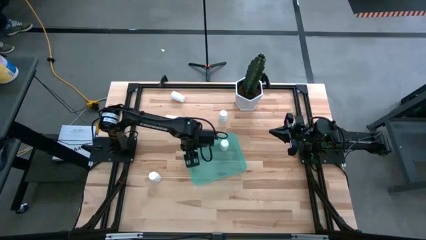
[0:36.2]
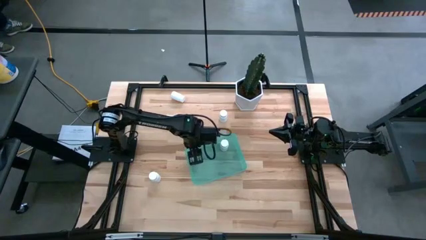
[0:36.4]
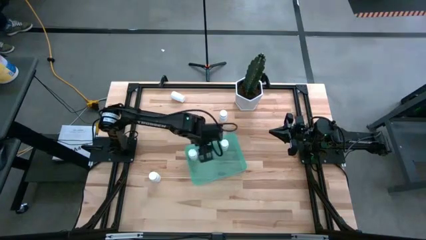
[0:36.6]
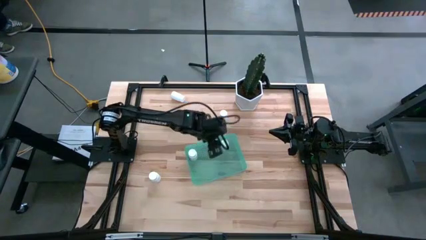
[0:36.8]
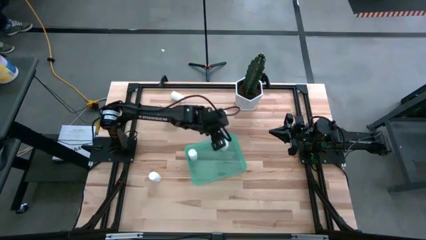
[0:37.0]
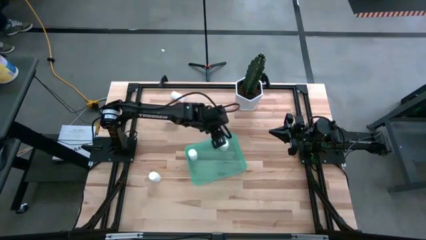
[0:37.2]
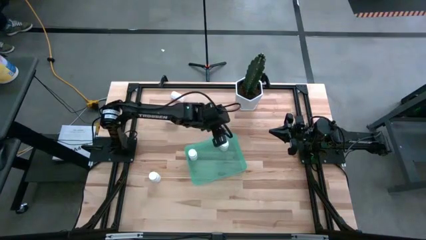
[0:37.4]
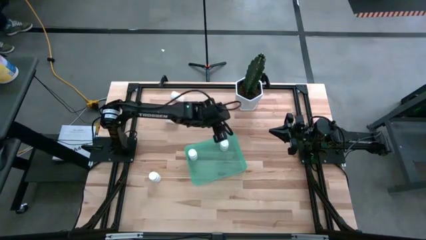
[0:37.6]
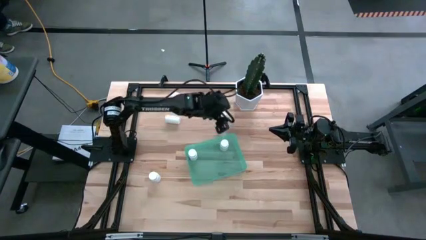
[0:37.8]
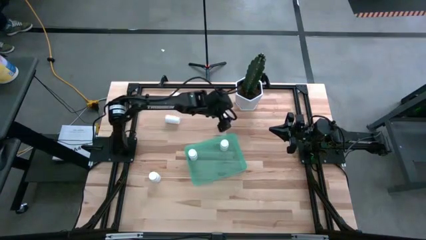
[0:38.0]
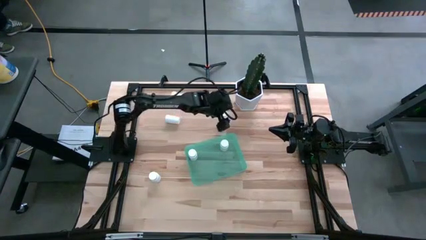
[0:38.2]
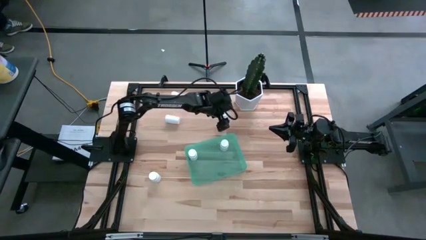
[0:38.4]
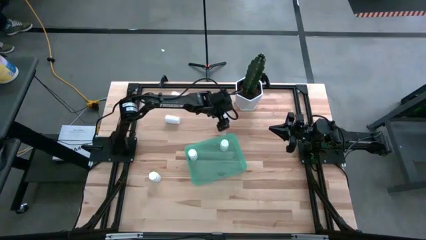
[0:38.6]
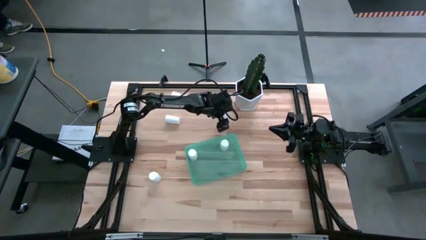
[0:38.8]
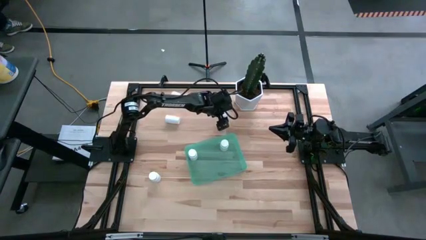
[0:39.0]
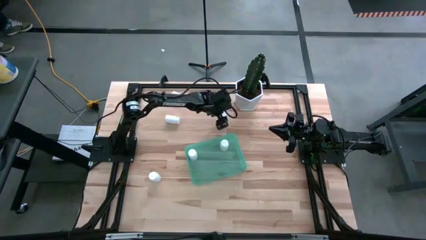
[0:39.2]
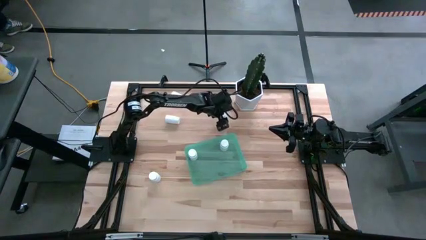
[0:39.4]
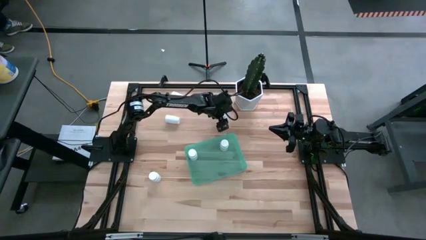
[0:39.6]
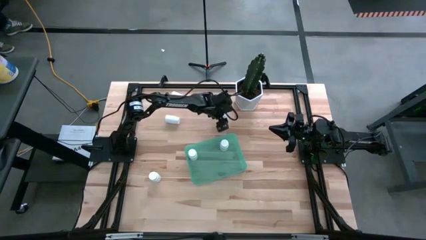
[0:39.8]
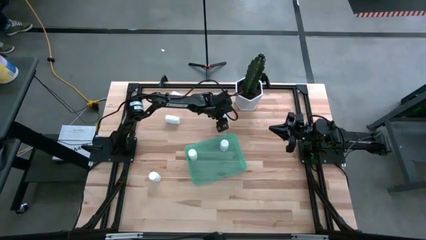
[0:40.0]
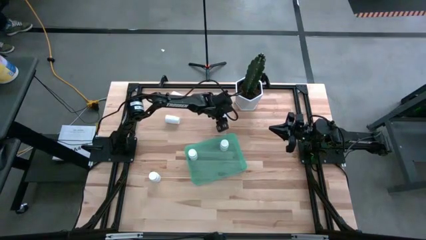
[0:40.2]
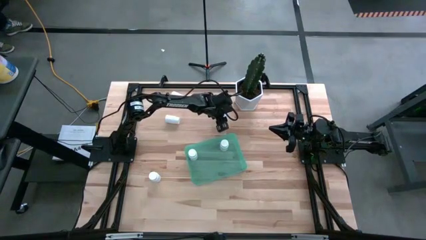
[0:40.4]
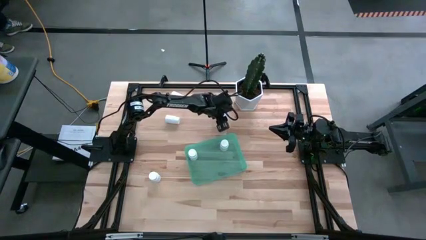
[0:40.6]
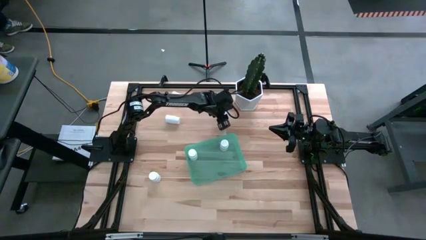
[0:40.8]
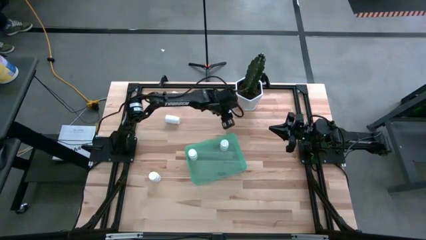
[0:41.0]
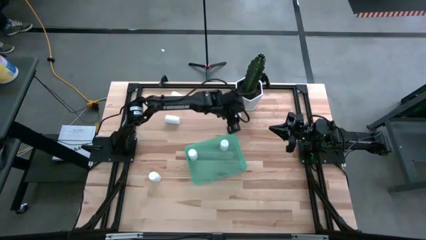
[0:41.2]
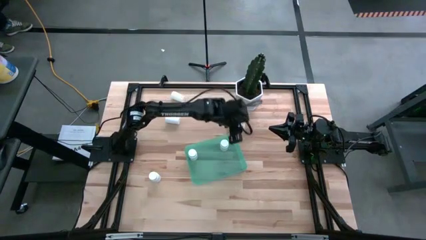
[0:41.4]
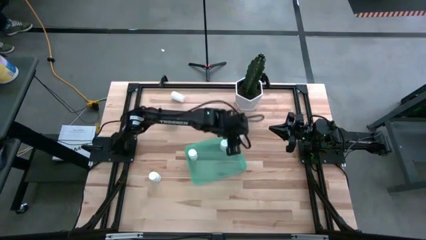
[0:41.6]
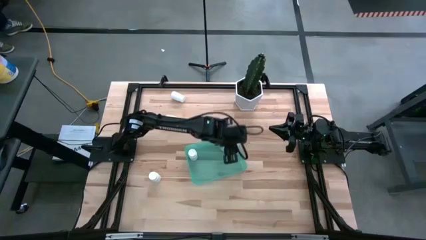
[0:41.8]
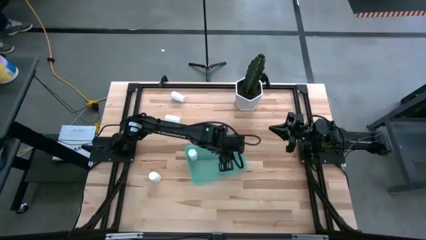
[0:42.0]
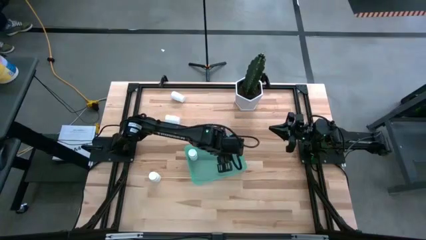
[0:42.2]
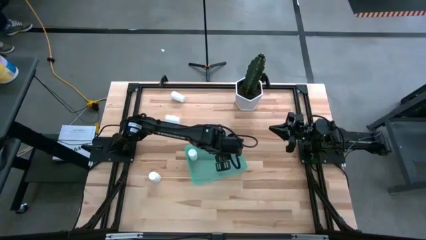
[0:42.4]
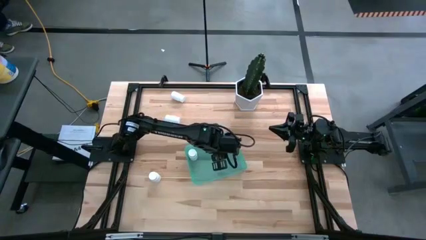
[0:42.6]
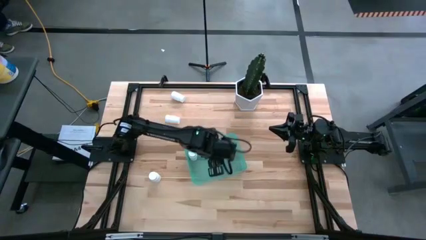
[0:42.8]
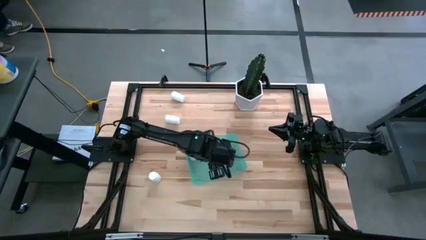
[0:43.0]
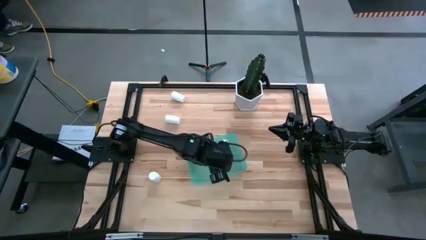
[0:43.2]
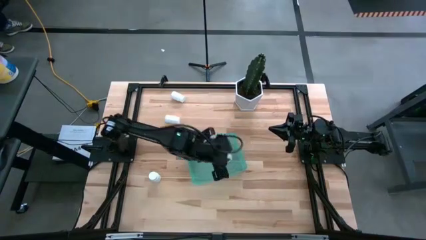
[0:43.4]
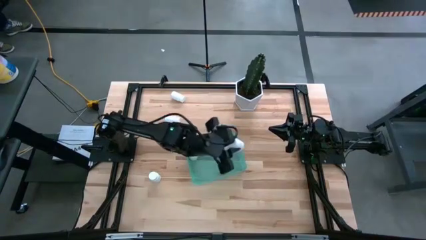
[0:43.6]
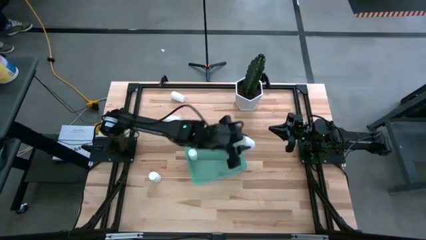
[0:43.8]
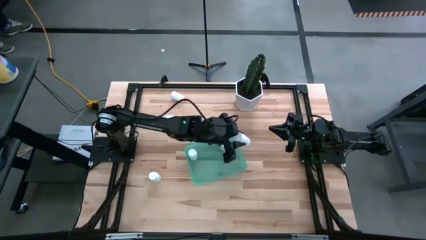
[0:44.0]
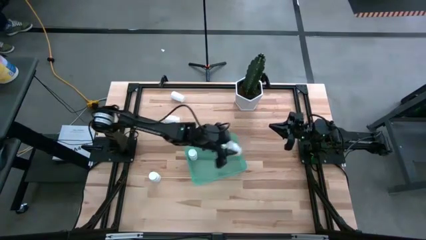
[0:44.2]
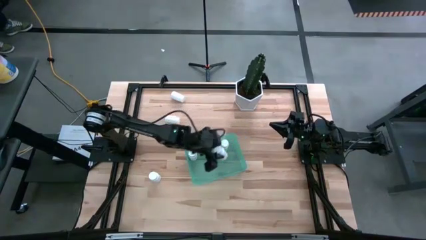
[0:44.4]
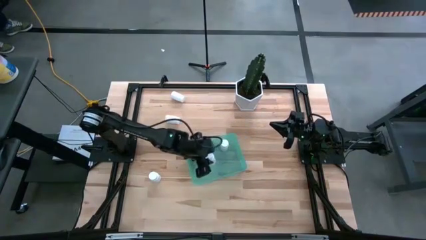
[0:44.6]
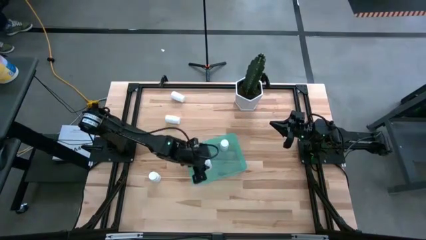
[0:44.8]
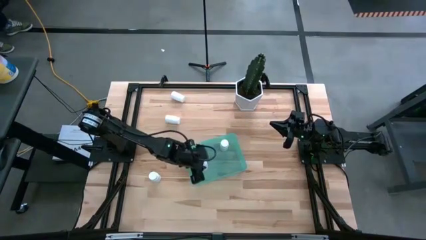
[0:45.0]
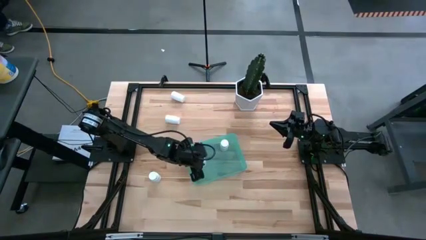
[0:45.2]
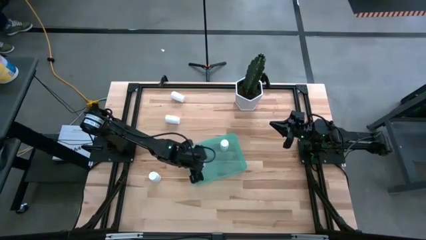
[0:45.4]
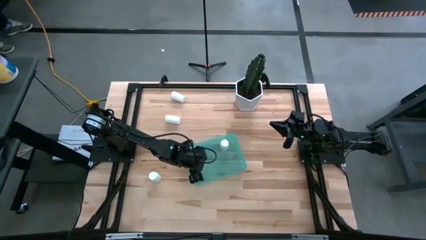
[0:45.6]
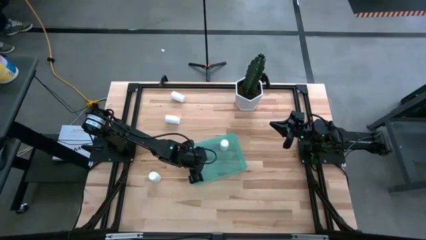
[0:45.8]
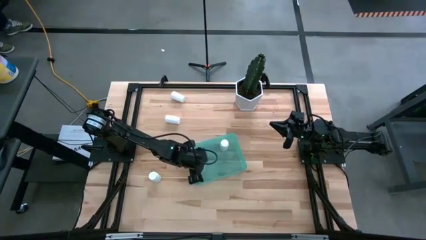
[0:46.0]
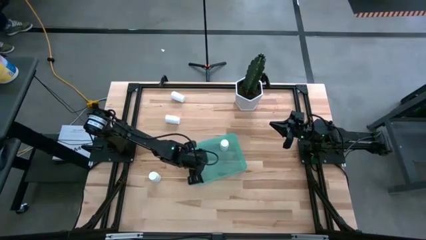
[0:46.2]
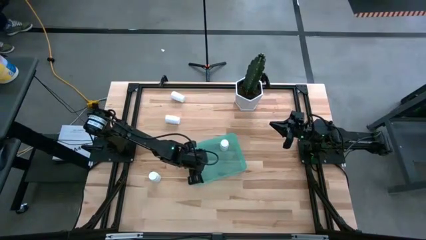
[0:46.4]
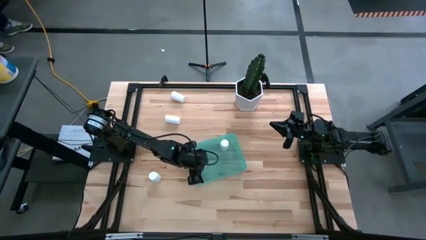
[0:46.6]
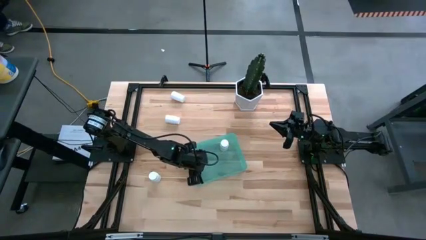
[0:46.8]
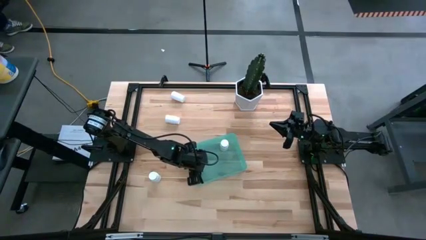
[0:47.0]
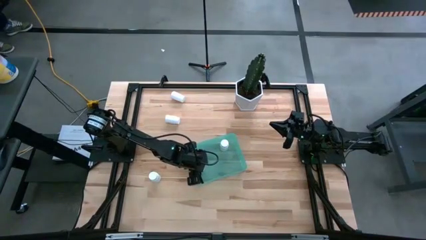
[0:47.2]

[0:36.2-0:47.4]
Task: Pick and place pill bottles into a basket
Put the white pill bottle into the green bin

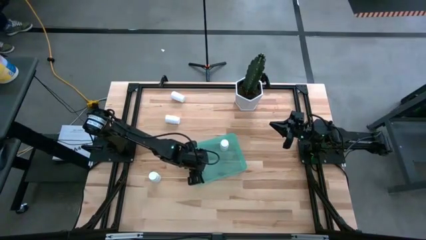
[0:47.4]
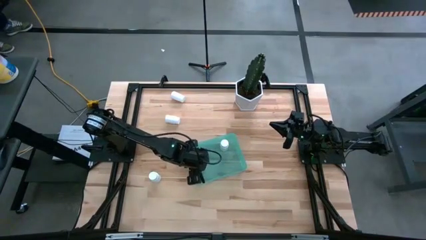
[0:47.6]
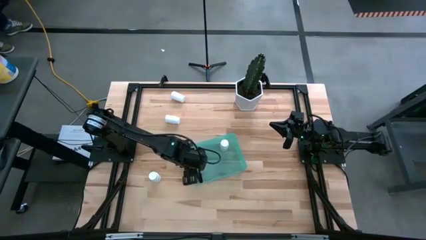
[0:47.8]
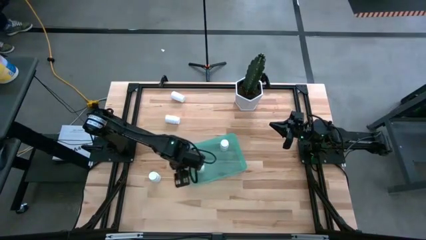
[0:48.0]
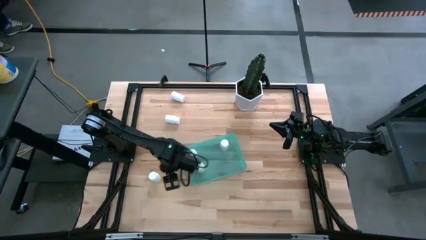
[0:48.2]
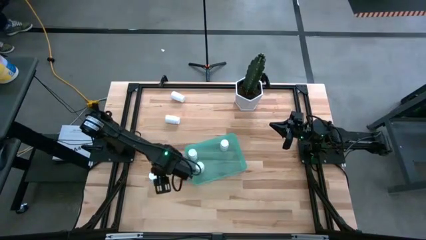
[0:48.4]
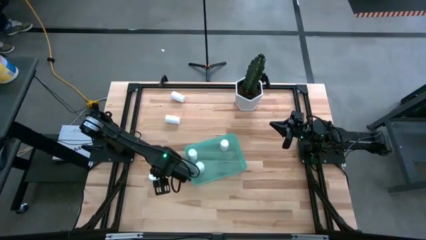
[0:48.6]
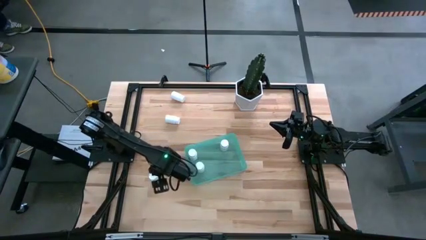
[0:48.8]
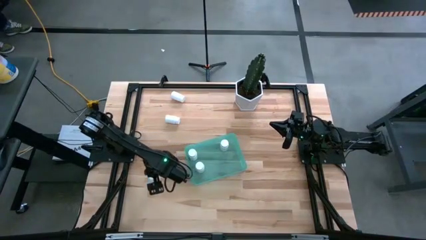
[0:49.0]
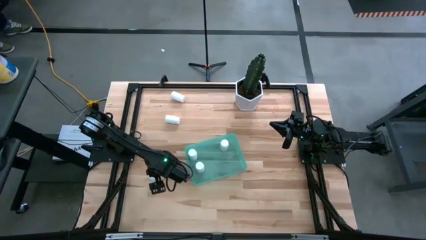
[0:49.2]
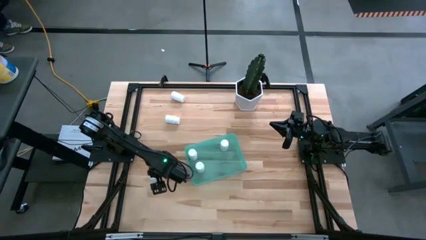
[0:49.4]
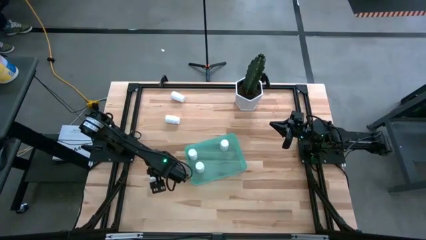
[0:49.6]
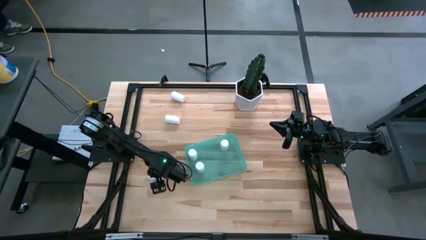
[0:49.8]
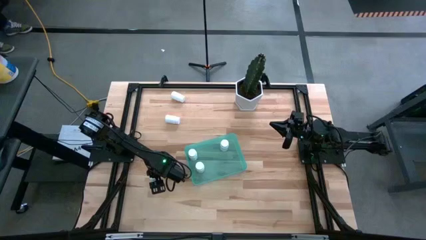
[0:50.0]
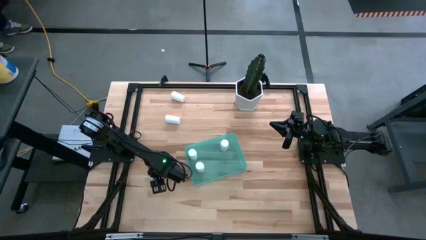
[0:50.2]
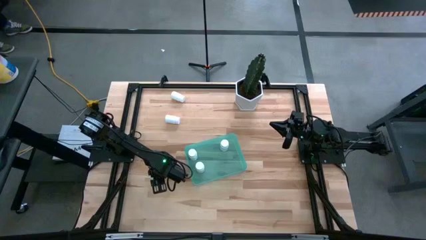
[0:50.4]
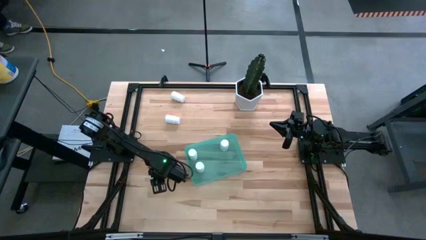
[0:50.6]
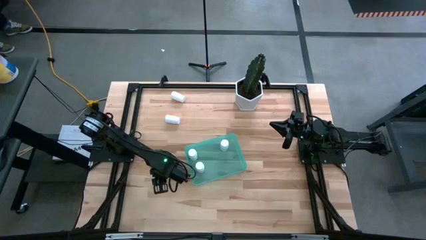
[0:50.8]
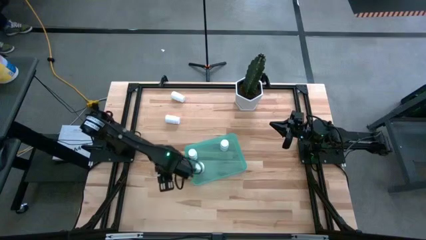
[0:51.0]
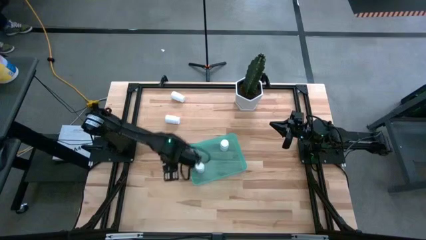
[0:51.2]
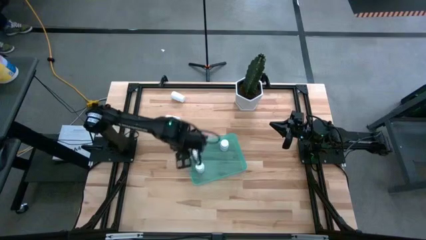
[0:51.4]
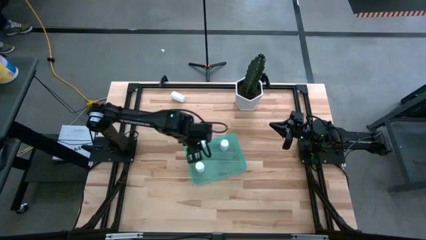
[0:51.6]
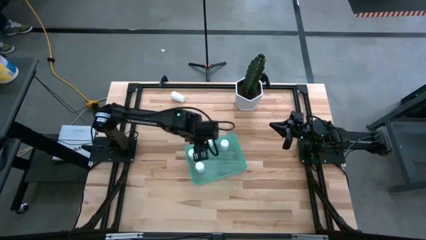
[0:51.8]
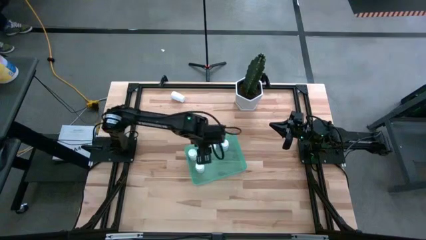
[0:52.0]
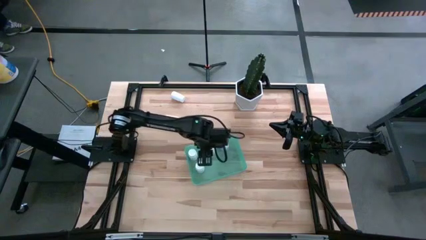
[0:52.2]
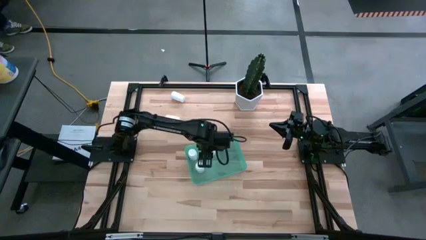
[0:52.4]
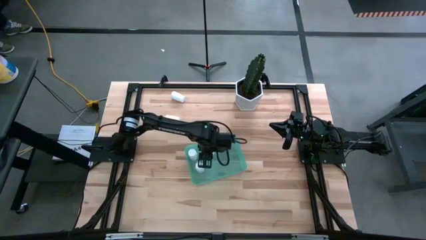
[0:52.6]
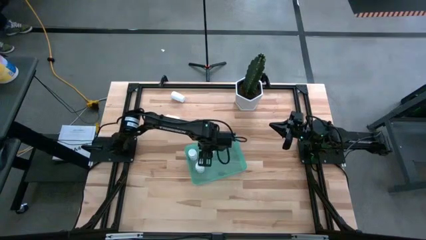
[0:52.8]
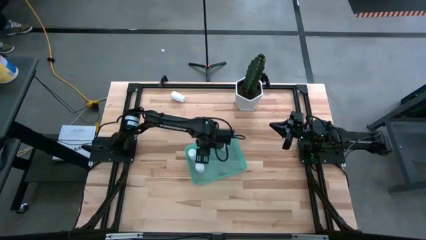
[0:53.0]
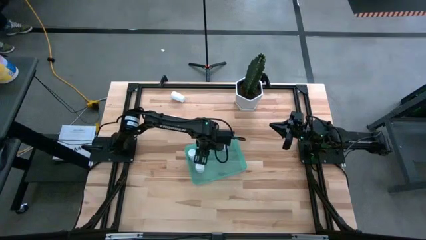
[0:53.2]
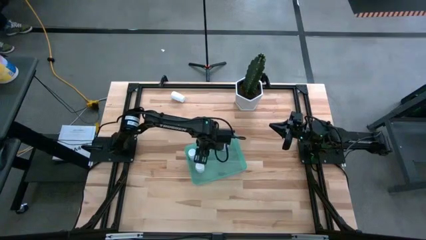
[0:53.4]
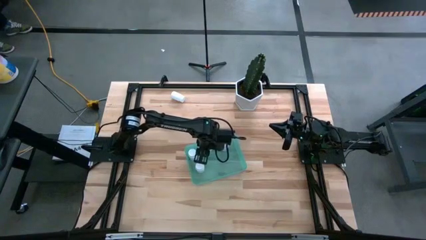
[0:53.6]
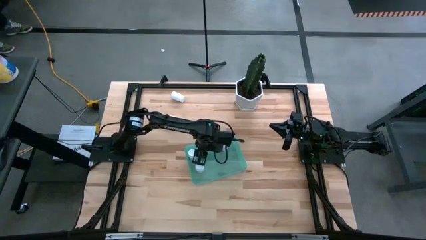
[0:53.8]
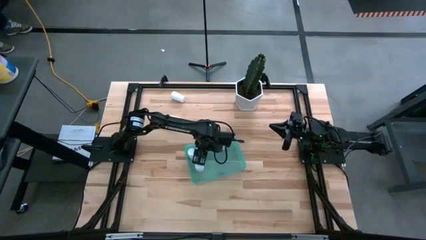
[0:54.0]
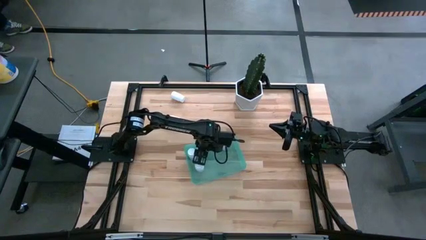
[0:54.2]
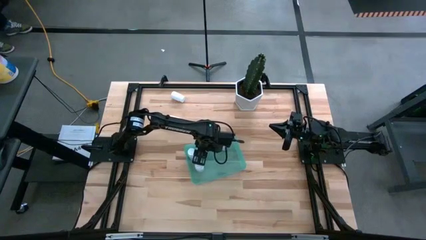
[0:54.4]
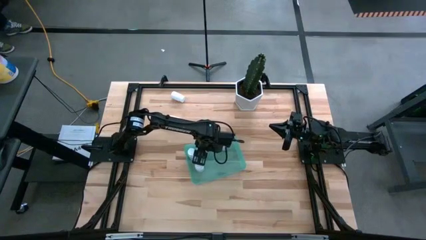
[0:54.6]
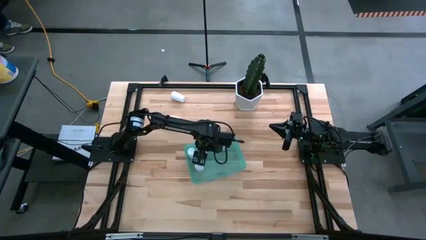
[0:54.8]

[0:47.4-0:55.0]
Put the bottom white pill bottle into the green bin
